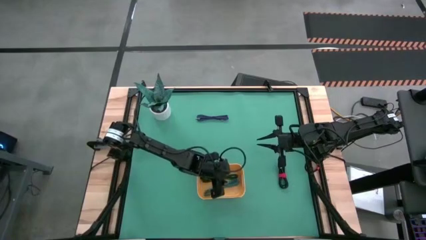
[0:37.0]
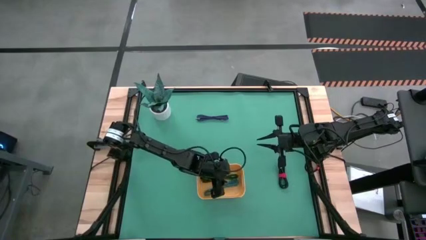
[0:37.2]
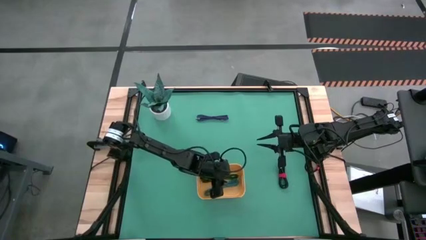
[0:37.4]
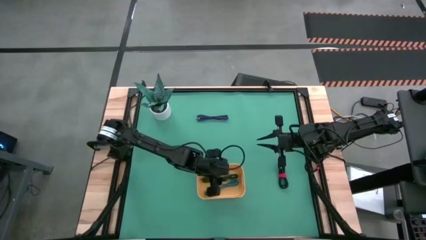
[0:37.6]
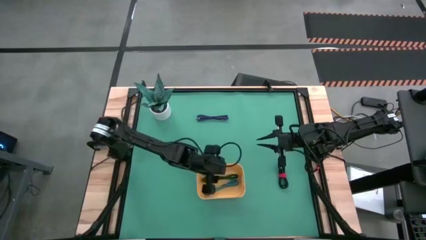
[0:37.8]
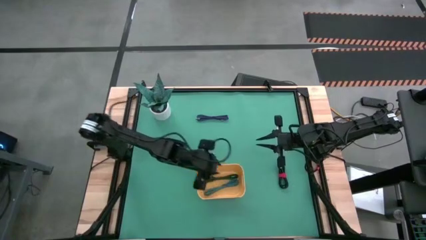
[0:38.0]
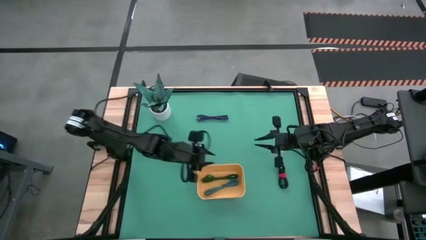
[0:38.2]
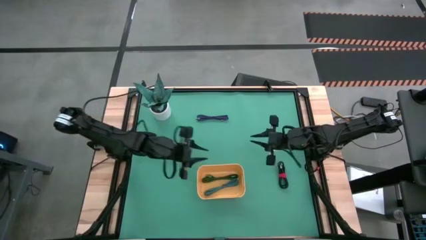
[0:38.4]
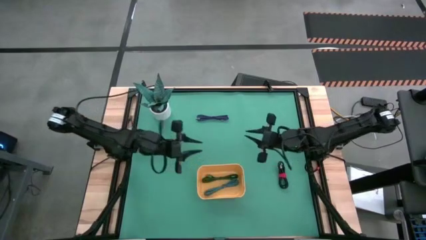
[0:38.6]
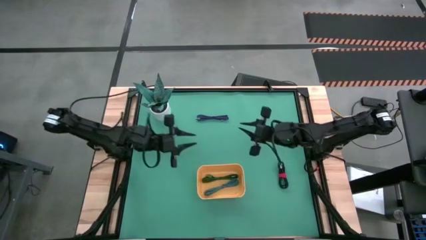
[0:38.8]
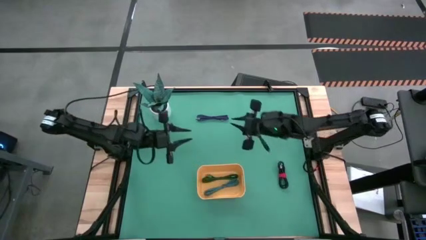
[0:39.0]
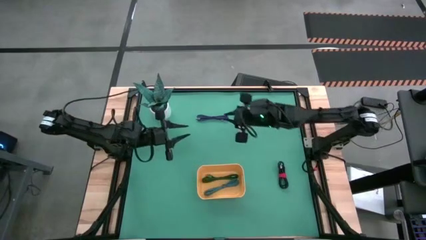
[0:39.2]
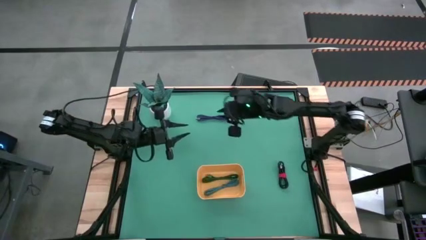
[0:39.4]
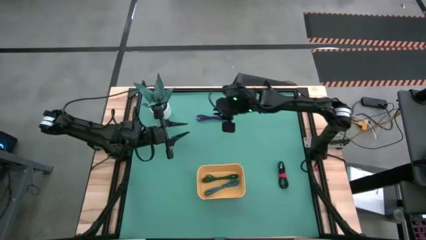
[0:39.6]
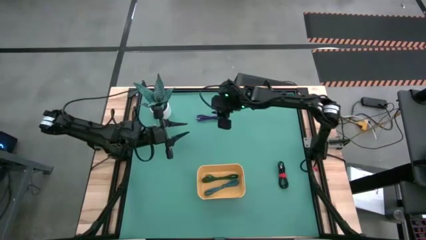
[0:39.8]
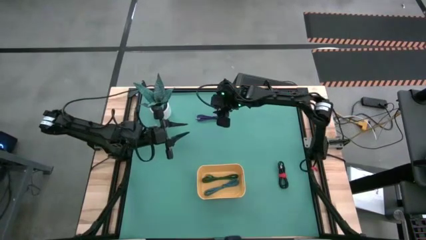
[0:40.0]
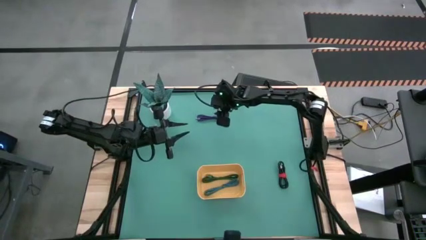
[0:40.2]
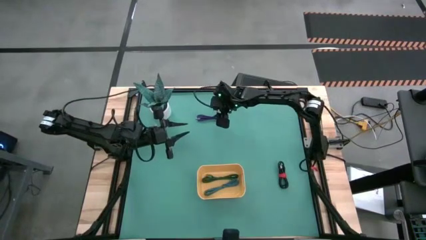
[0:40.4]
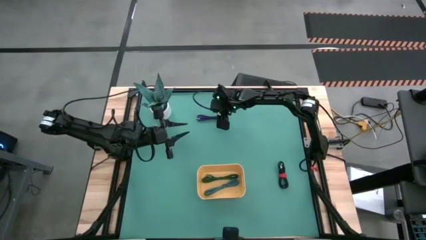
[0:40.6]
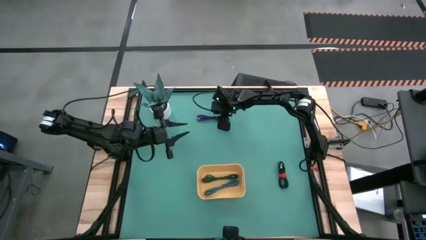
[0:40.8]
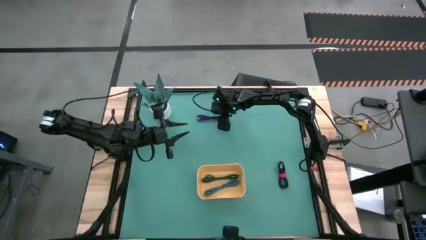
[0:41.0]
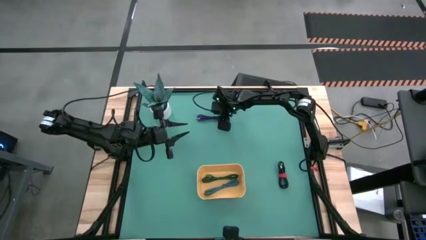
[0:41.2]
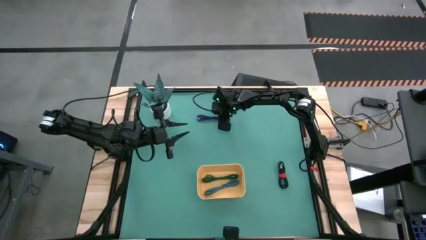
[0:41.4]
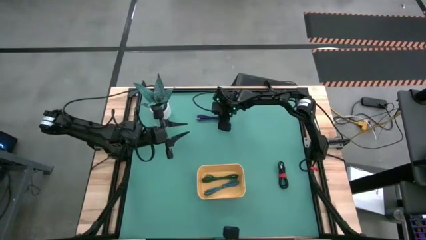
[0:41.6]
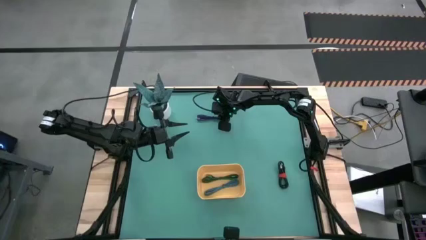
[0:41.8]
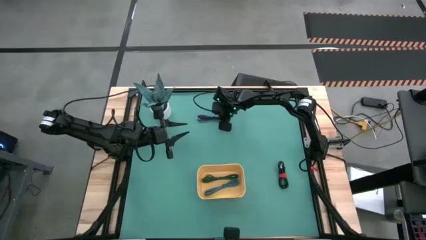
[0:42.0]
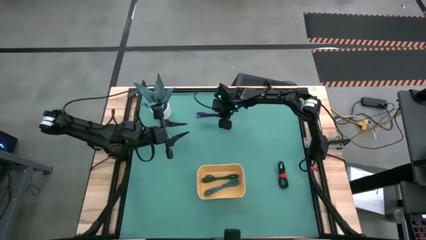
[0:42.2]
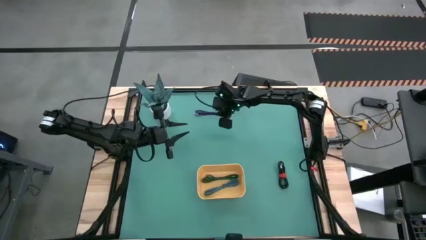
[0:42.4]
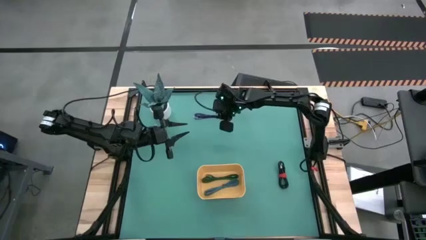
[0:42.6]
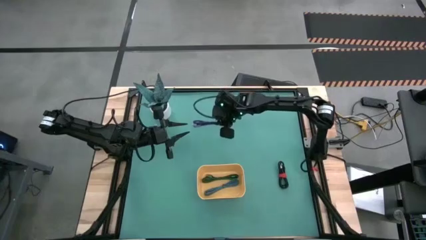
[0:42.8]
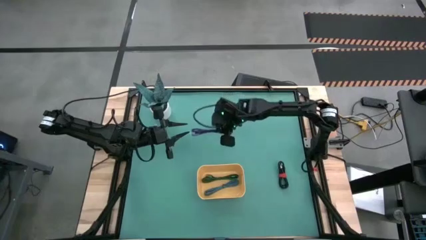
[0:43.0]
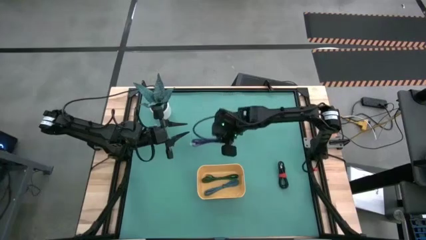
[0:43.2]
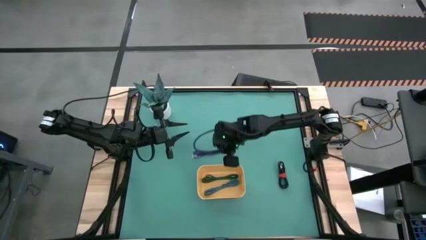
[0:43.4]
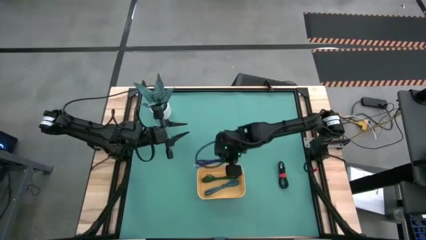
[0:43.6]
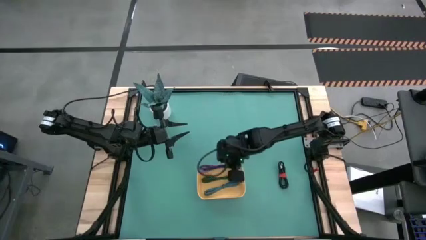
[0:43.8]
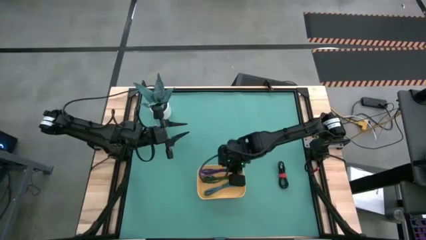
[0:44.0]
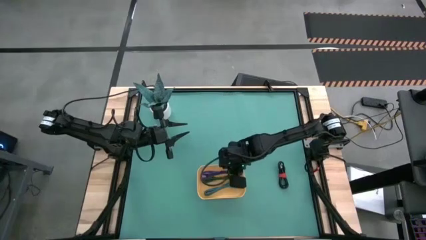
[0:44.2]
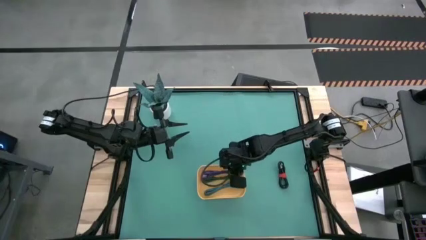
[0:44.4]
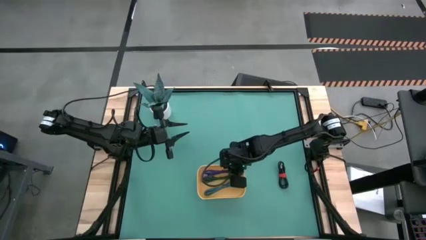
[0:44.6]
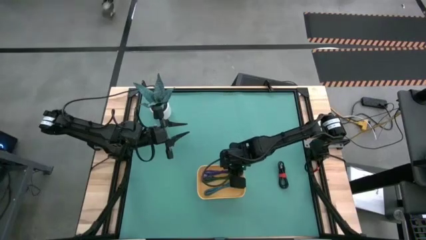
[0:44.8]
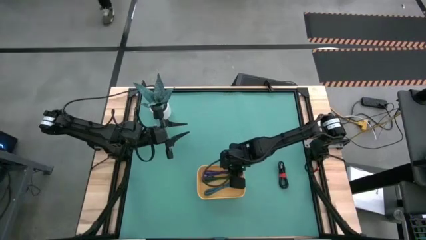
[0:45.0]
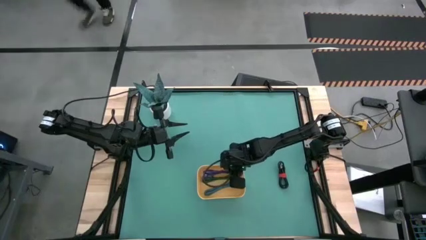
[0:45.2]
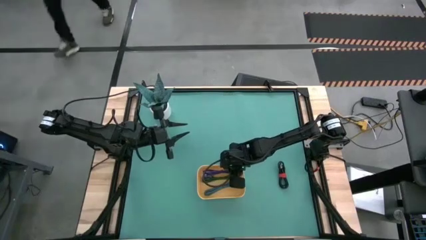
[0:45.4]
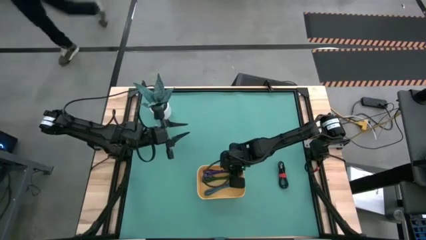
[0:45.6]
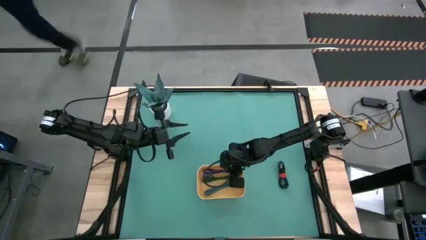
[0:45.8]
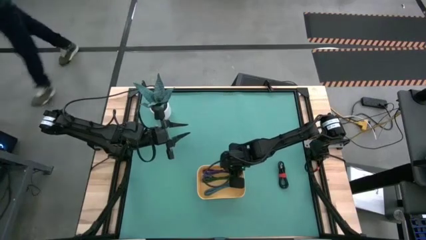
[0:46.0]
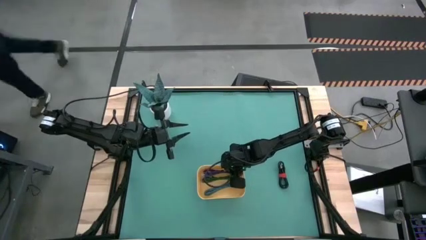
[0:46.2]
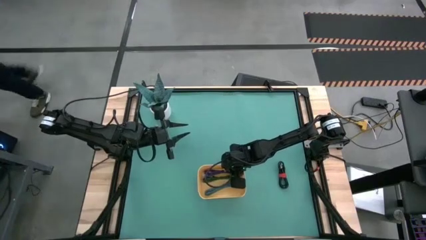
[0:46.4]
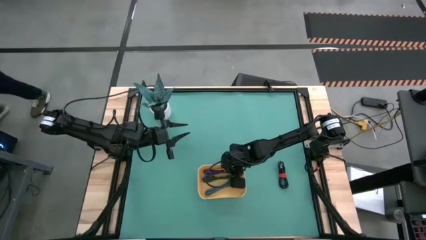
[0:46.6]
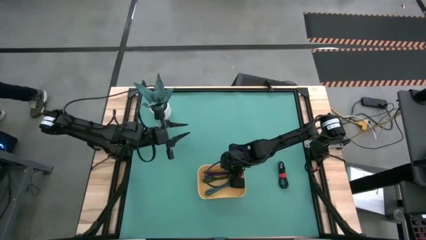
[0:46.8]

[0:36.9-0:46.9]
Task: Pick and place USB-C Cables
Put the violet charger cable into the yellow bin

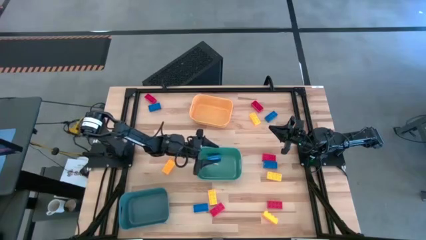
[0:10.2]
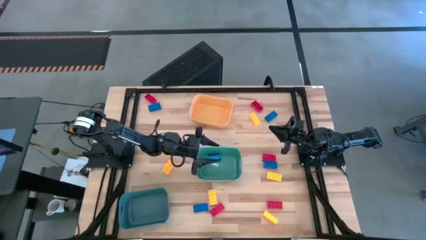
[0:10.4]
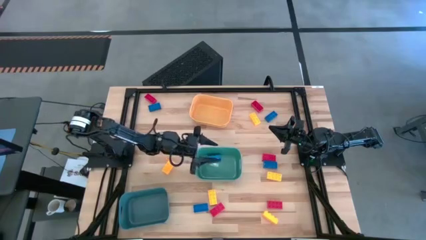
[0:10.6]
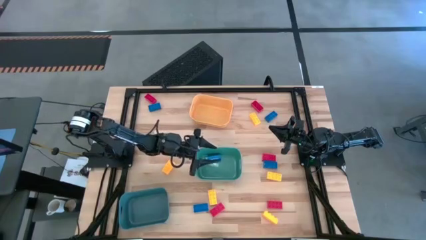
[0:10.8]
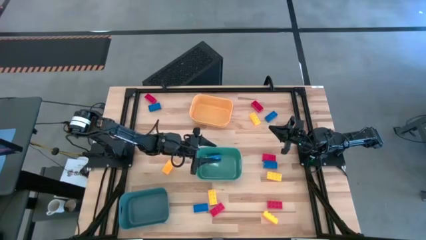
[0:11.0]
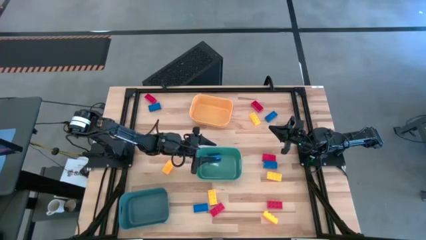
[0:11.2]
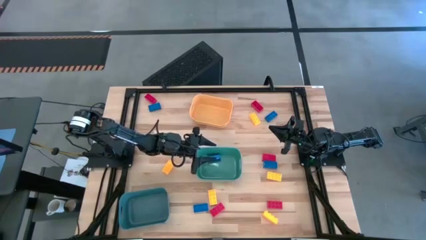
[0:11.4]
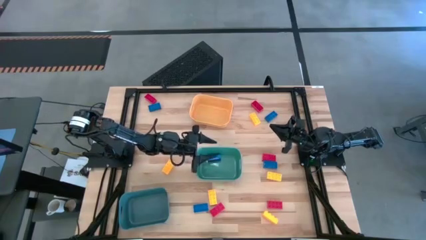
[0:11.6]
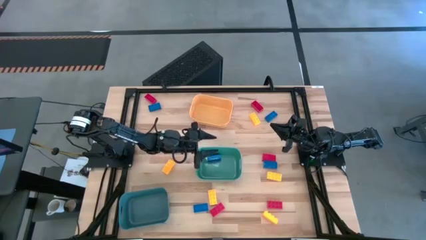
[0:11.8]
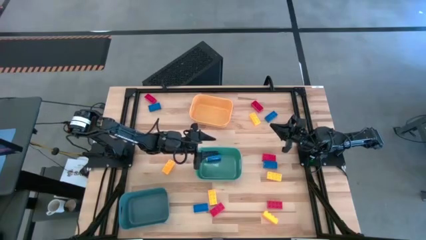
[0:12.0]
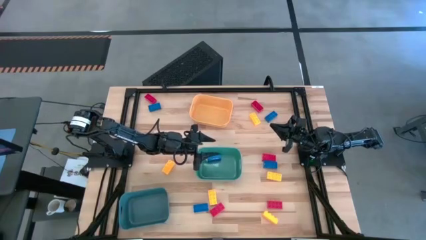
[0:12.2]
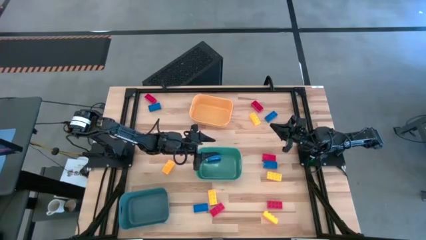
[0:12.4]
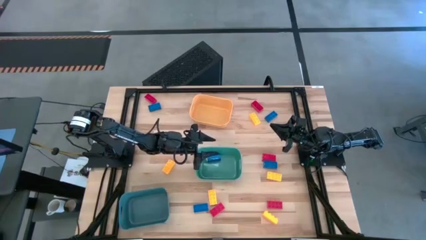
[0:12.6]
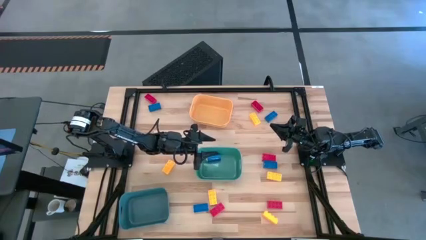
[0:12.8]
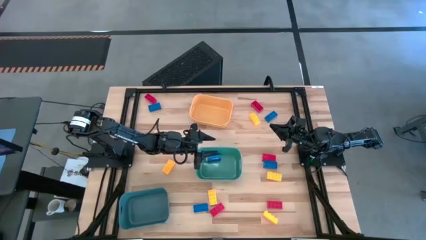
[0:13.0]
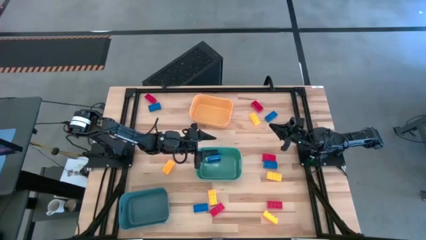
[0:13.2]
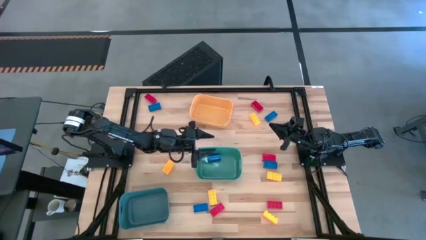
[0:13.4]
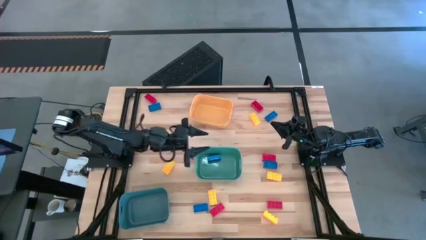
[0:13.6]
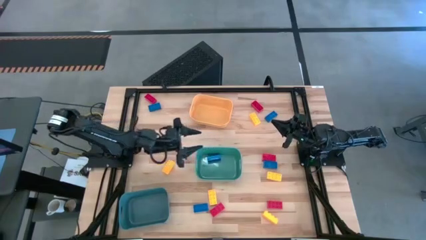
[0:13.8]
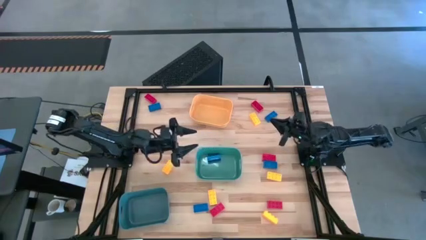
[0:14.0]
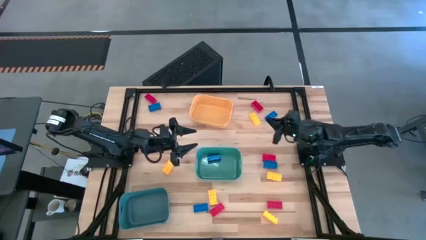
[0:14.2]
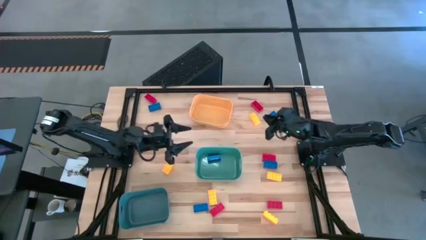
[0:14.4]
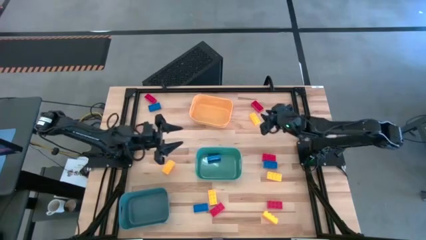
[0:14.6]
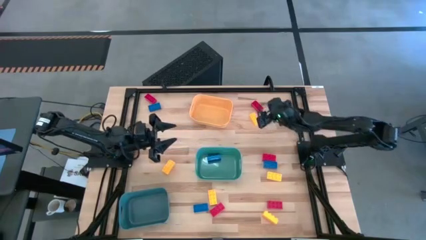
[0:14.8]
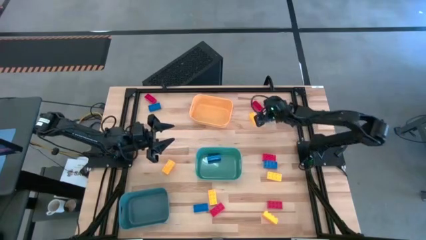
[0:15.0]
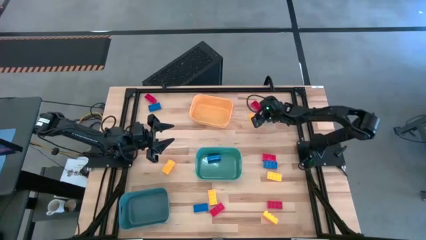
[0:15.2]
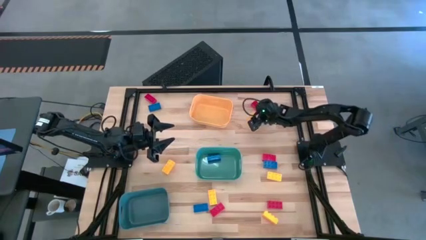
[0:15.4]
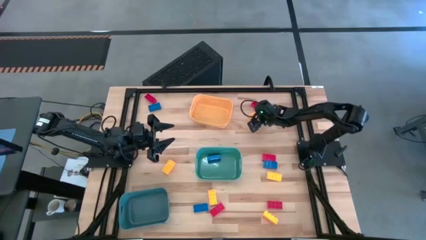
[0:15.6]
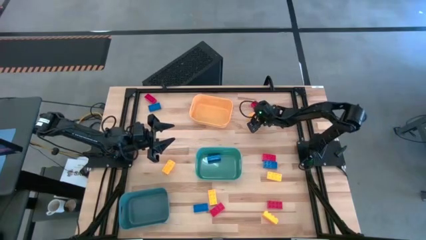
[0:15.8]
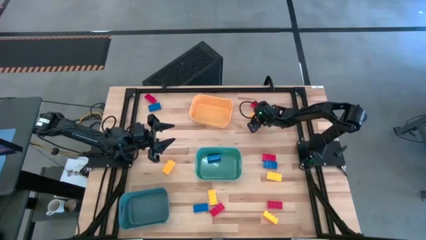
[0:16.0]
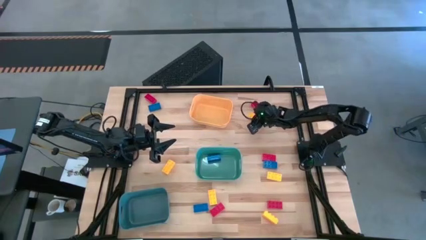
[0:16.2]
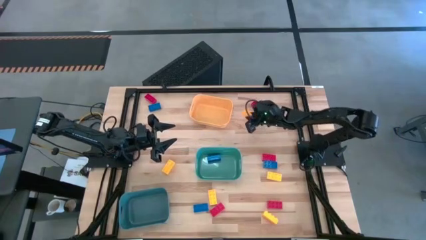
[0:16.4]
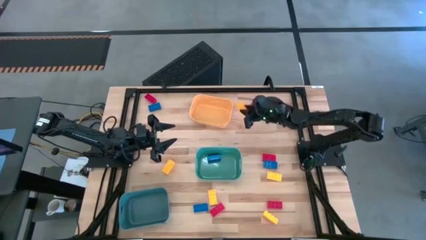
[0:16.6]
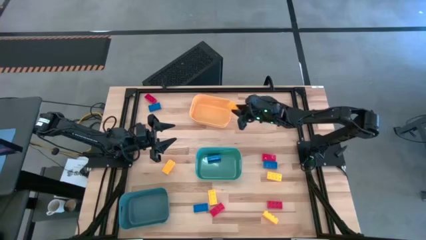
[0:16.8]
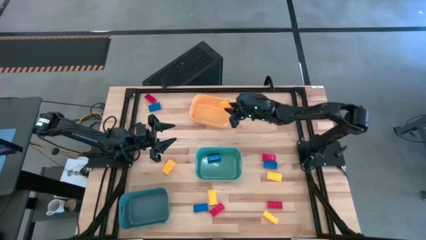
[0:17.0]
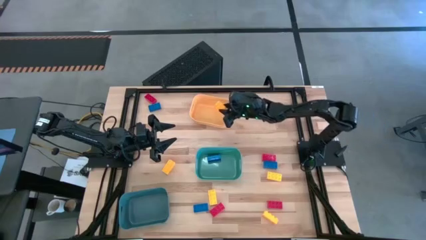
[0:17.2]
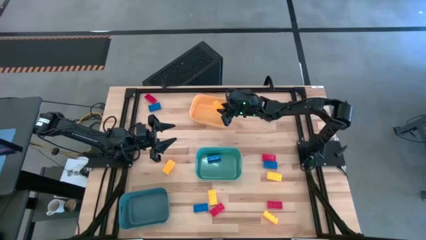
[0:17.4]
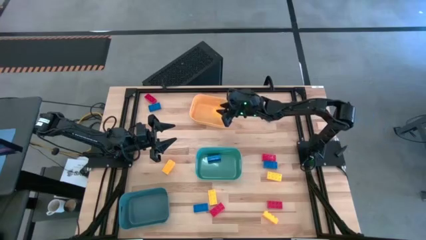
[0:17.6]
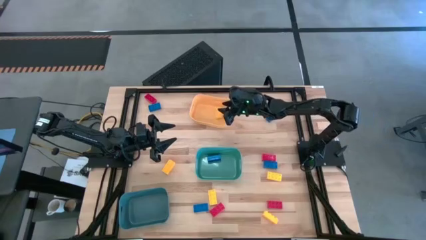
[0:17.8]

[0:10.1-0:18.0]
Task: Sort & place blocks by color
Put the yellow game piece into the yellow bin
